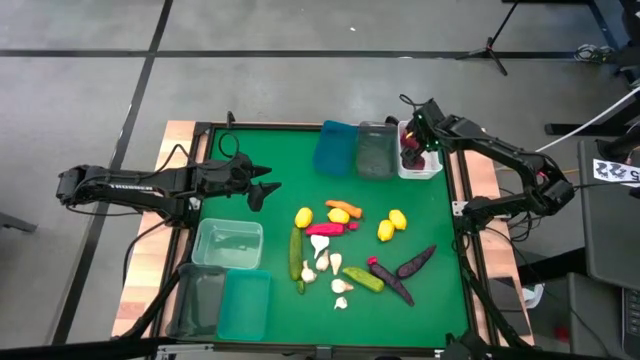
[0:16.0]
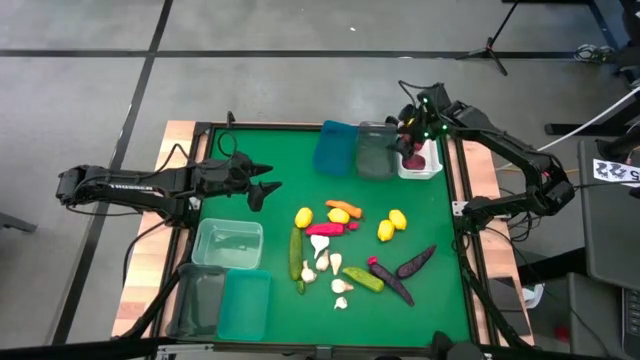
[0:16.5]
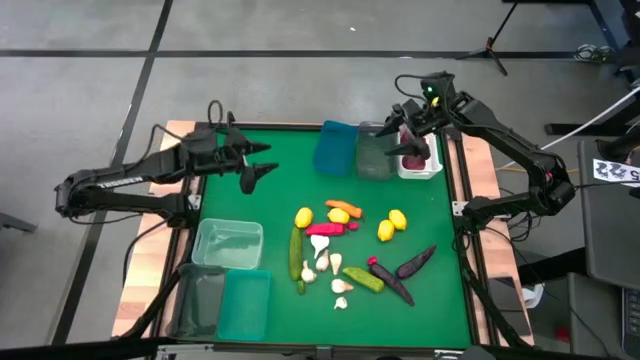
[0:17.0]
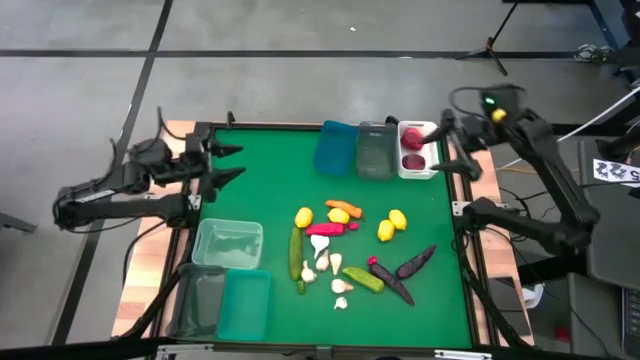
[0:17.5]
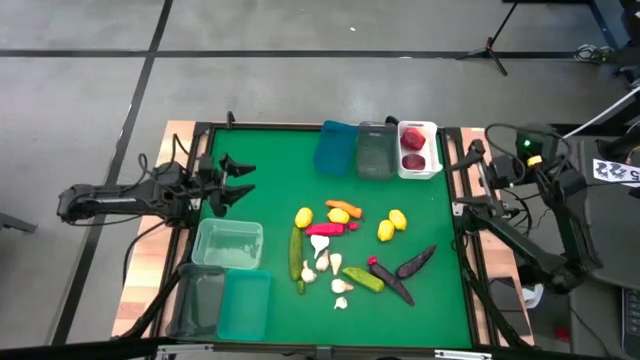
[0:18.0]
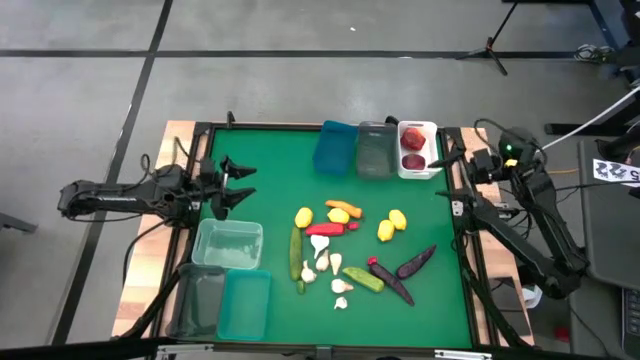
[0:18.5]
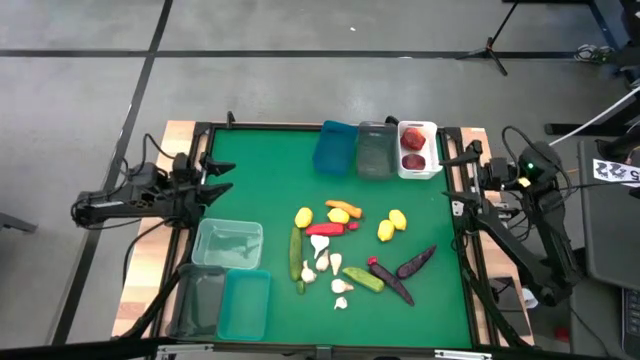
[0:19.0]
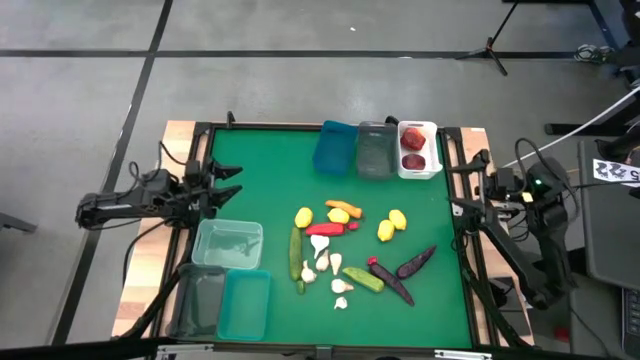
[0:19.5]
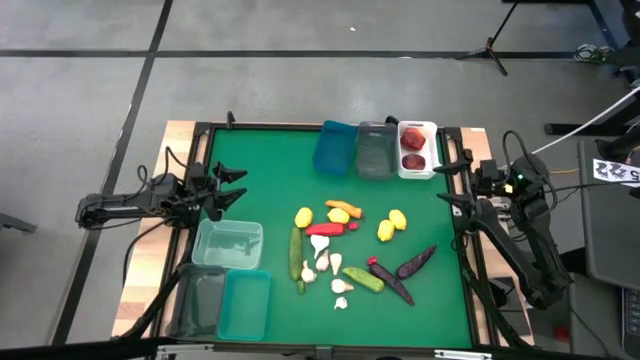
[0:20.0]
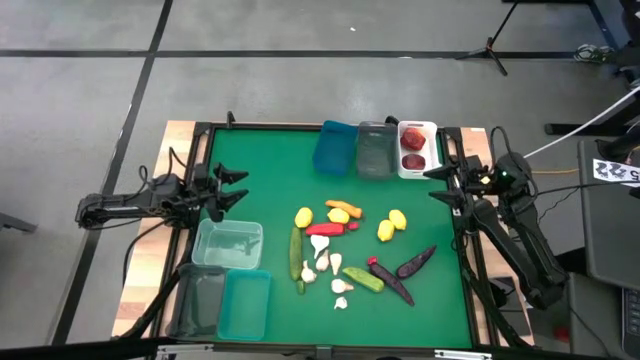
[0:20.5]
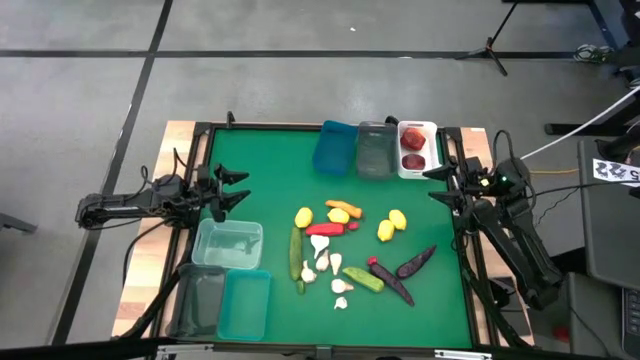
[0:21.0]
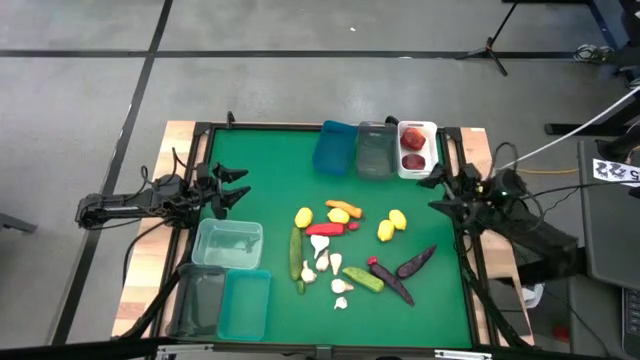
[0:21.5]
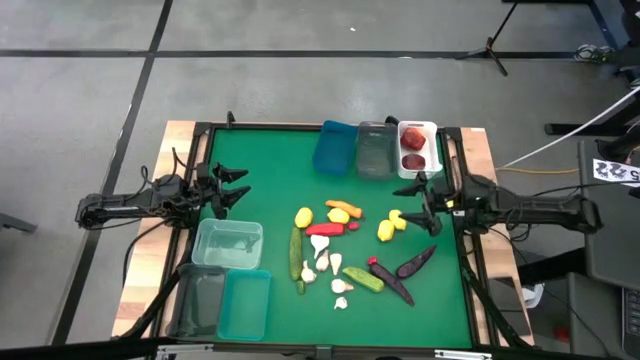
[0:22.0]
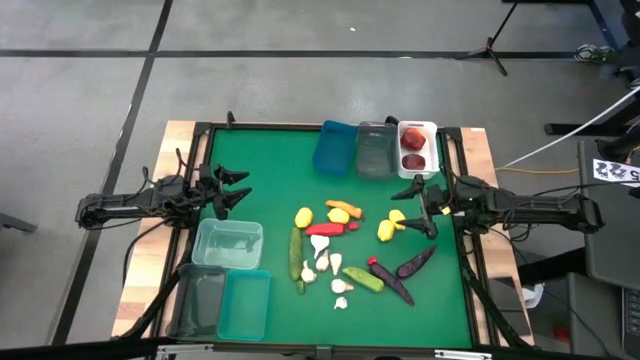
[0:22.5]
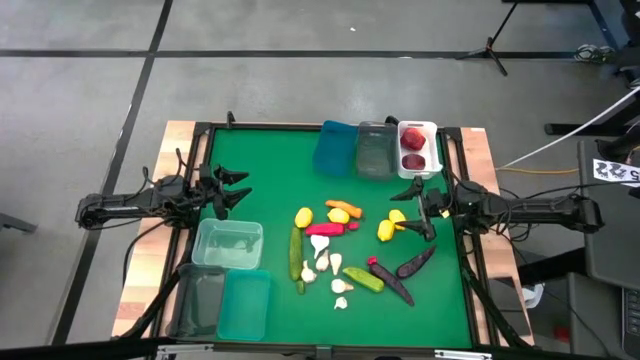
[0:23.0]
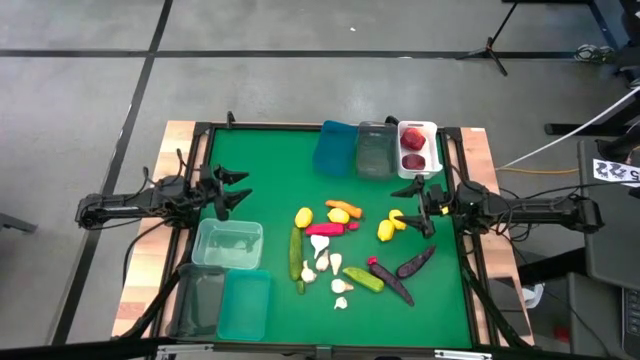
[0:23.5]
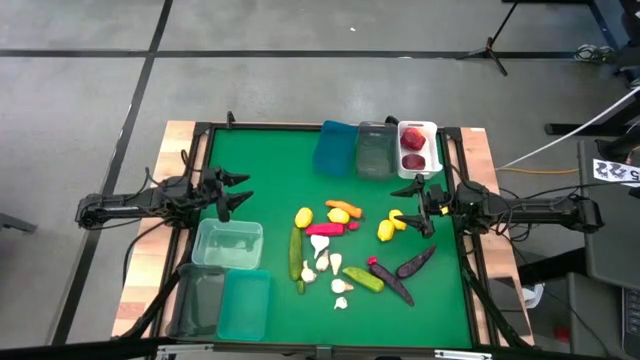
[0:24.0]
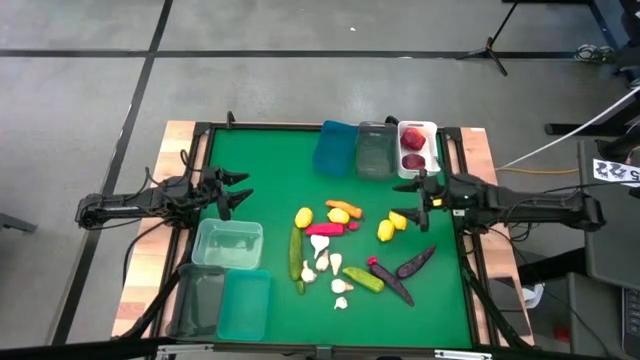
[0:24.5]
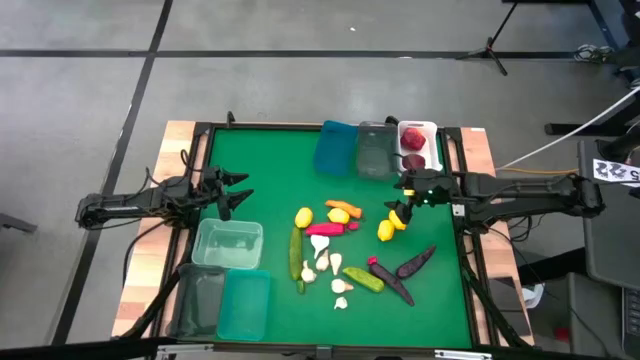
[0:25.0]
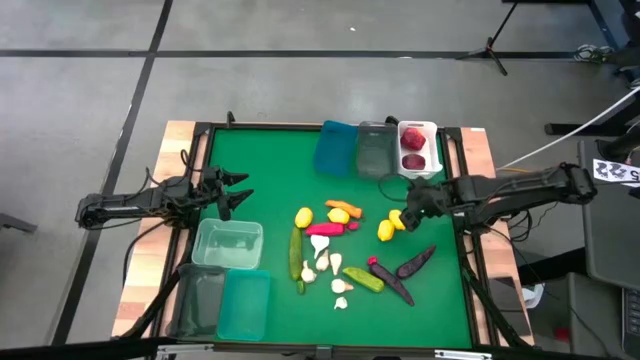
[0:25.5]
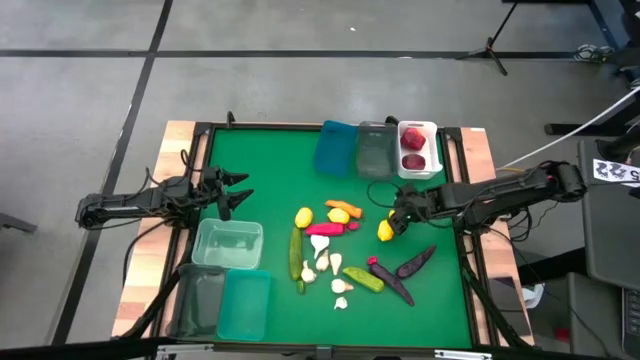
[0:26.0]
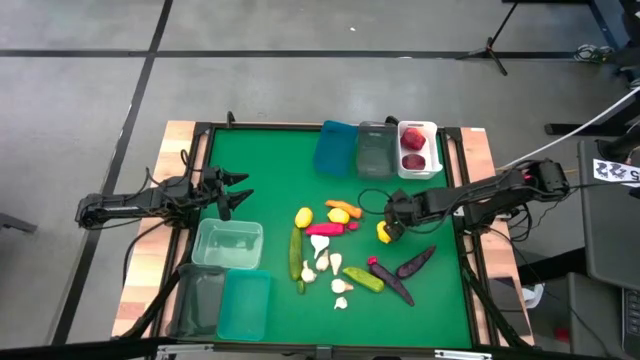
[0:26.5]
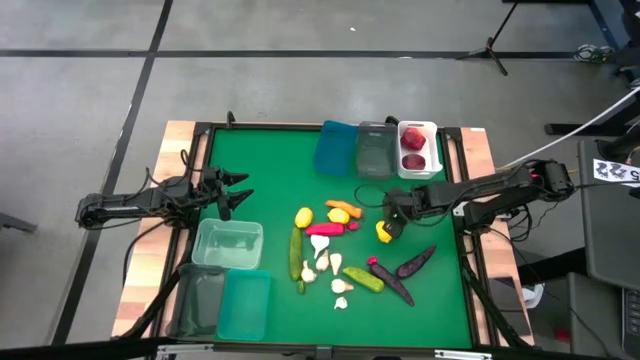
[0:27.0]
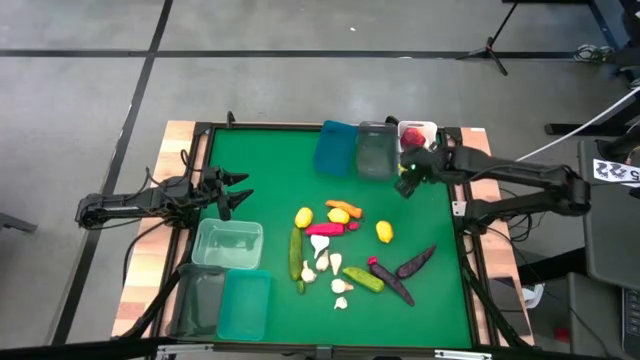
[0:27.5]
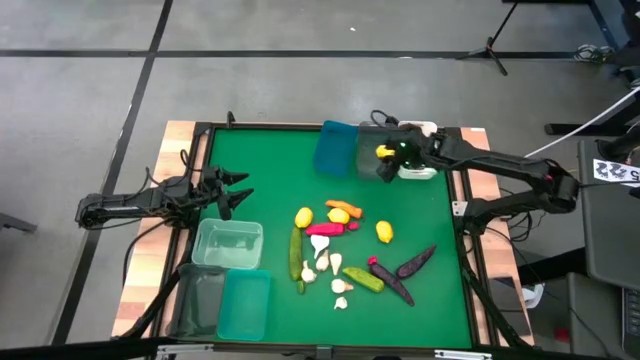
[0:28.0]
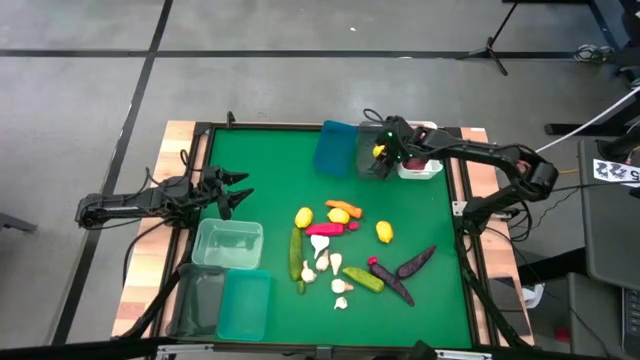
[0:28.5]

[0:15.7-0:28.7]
Task: Sort produce into baskets
Put the yellow lemon into the top black bin

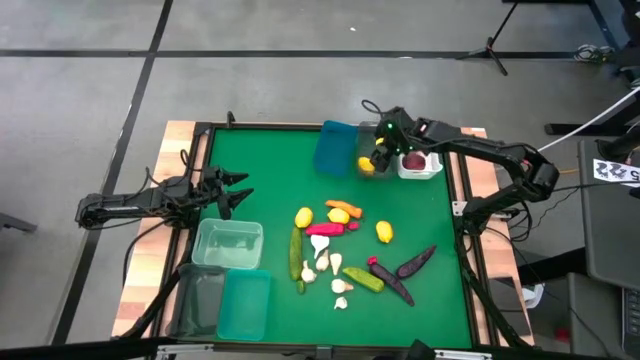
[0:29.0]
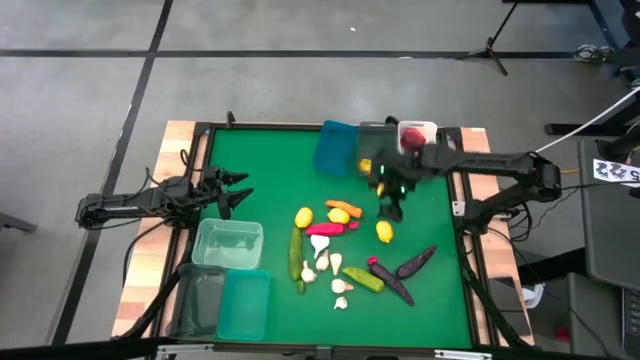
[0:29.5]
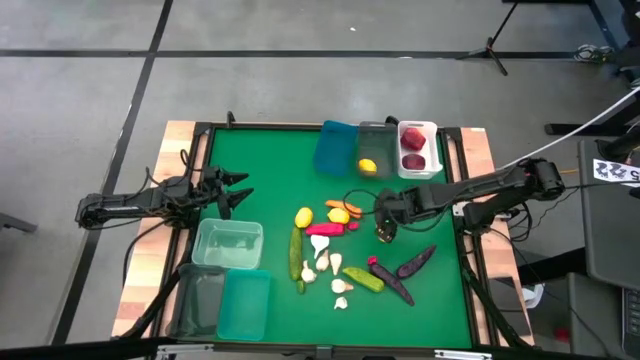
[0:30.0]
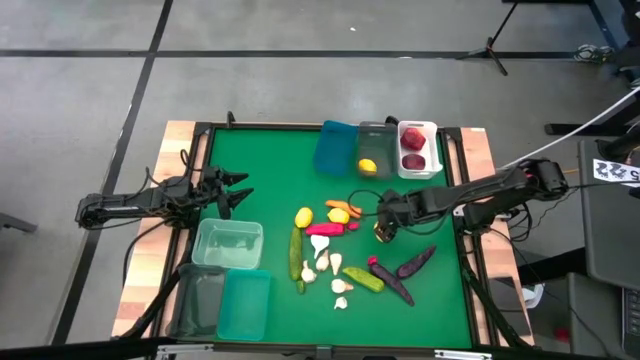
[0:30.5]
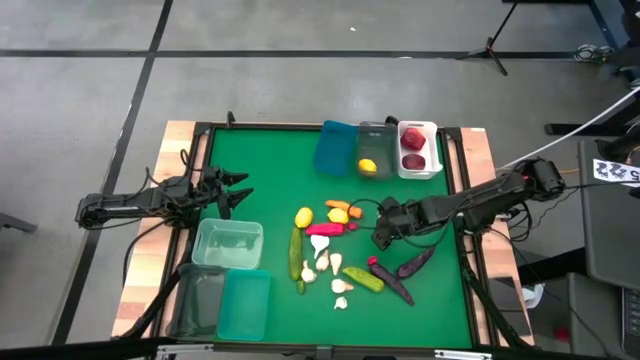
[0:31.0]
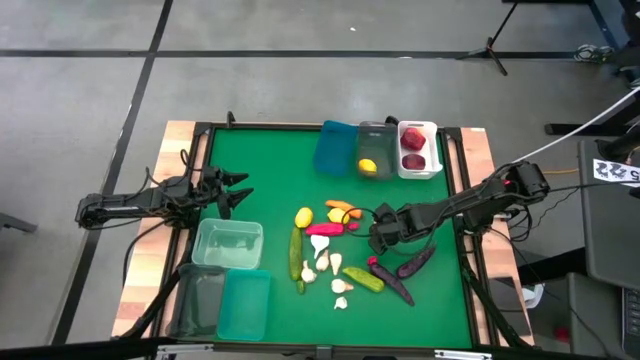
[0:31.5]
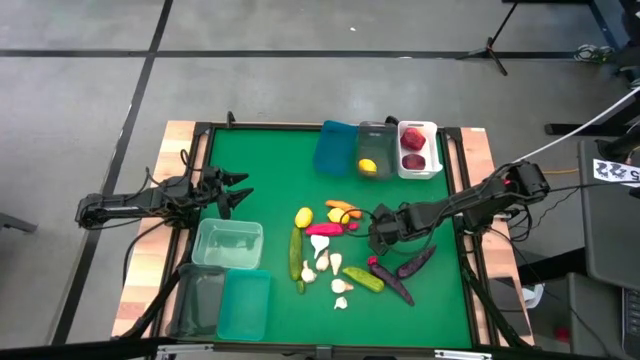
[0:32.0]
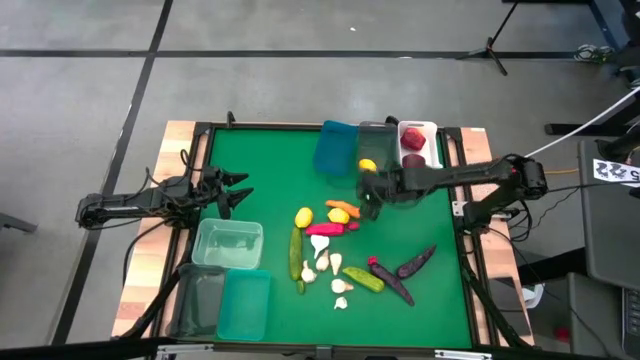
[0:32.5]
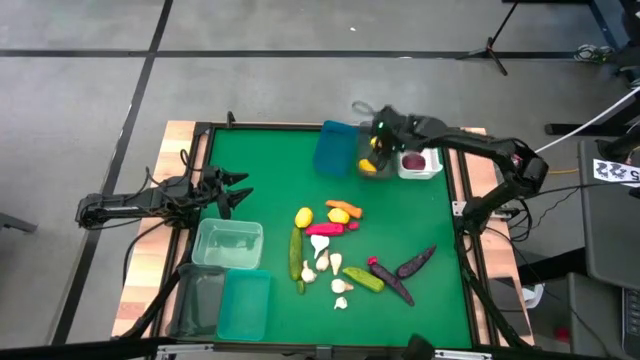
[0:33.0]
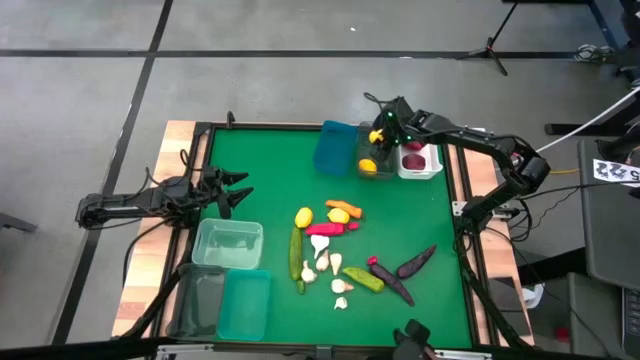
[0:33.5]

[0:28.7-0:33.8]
Put the yellow lemon into the top black bin

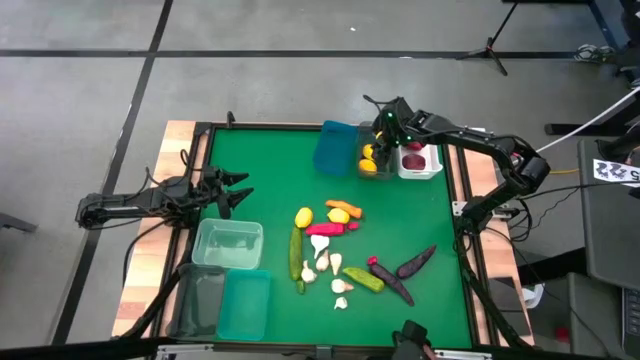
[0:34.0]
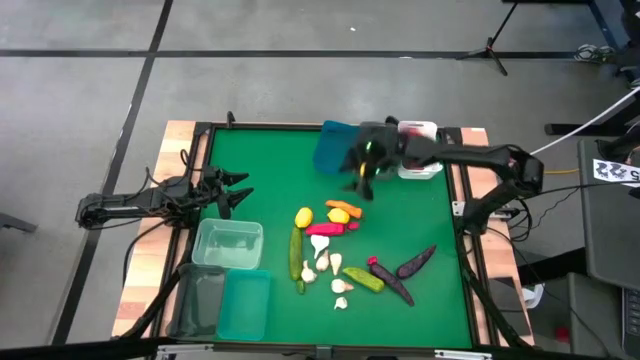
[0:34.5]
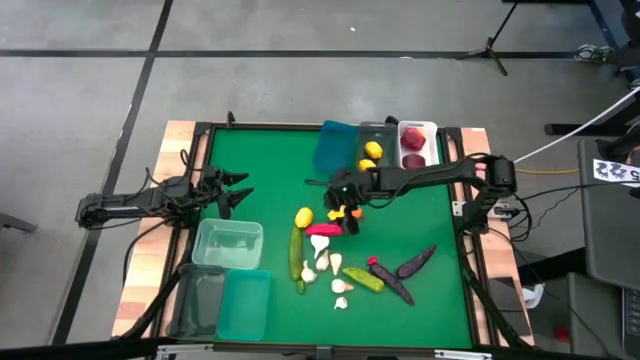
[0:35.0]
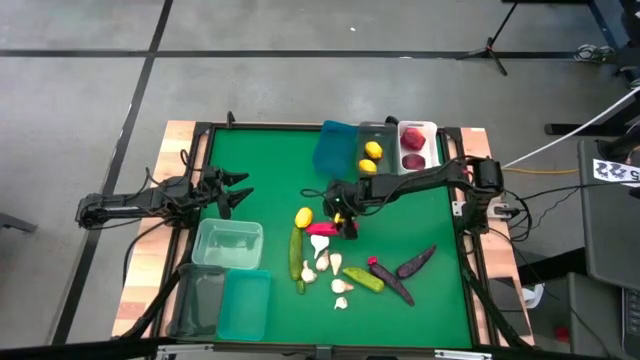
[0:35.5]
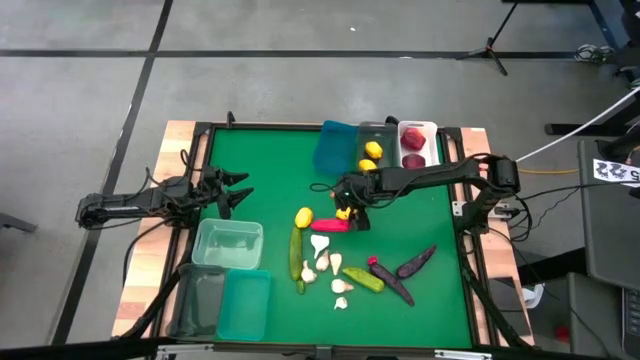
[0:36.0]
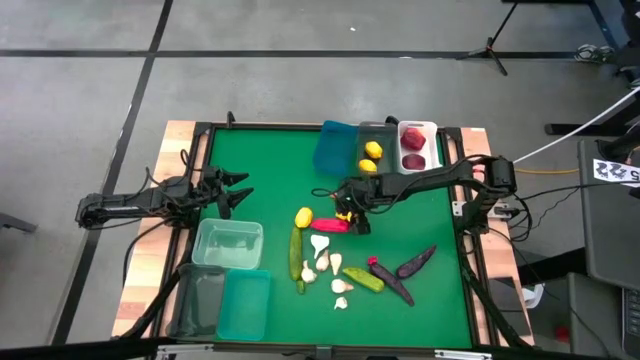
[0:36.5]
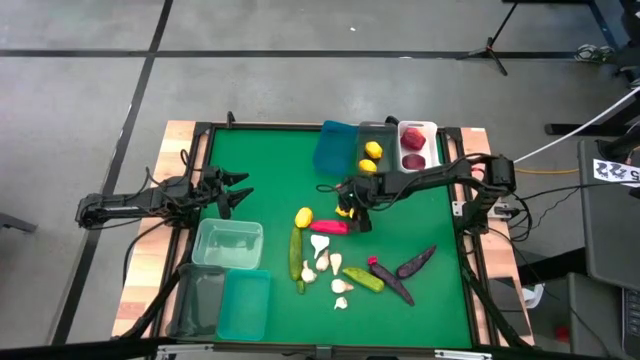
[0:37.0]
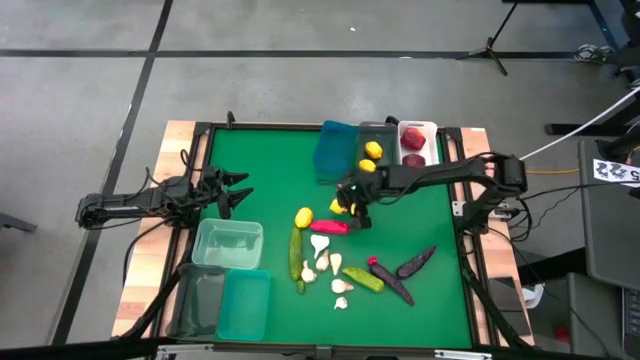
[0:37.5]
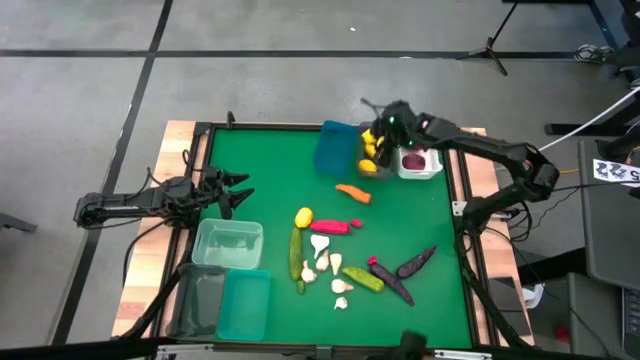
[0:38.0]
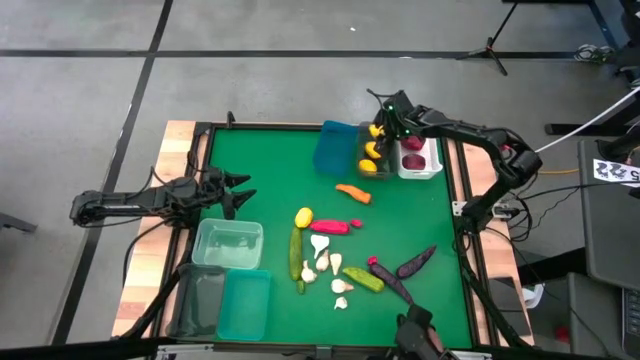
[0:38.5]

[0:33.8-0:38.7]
Put the yellow lemon into the top black bin
